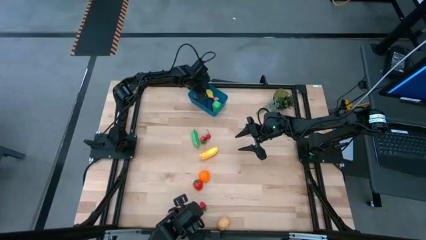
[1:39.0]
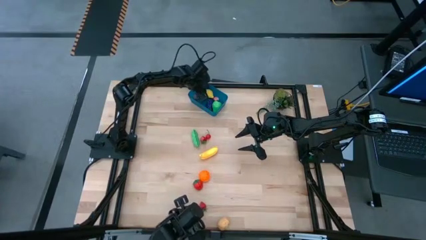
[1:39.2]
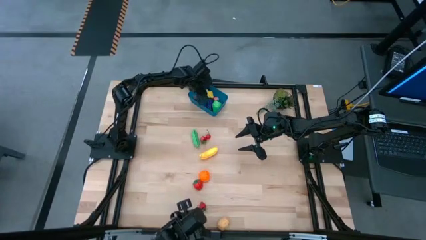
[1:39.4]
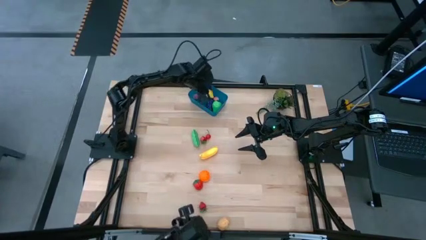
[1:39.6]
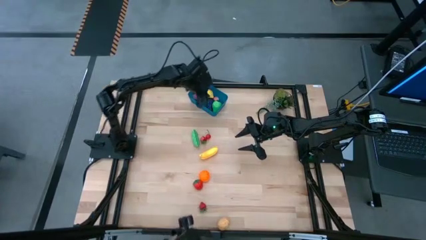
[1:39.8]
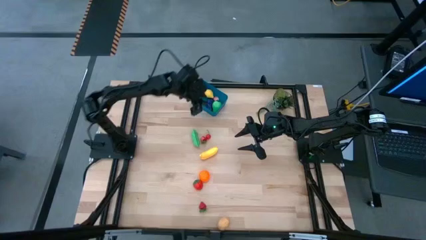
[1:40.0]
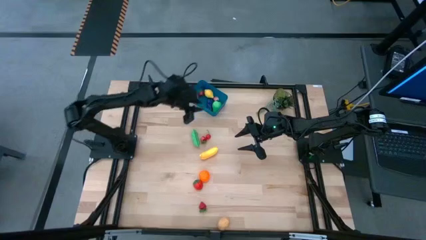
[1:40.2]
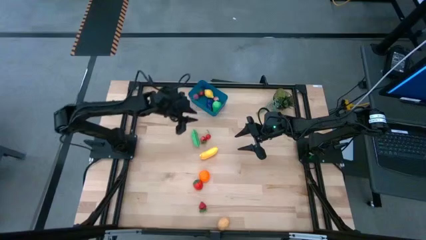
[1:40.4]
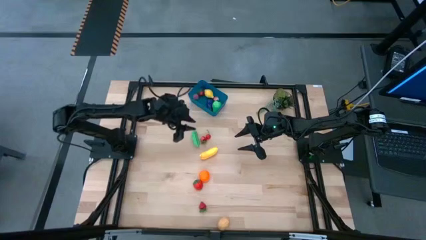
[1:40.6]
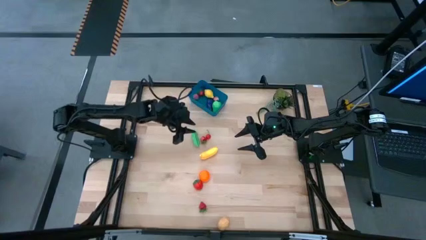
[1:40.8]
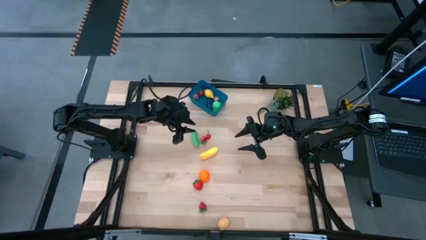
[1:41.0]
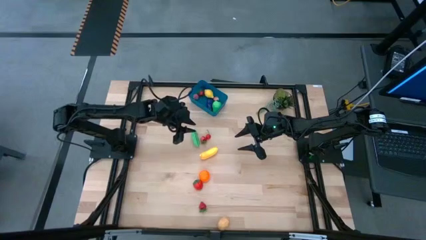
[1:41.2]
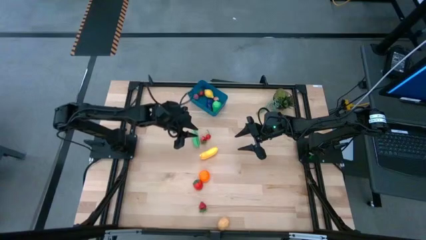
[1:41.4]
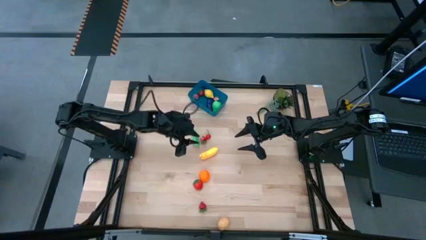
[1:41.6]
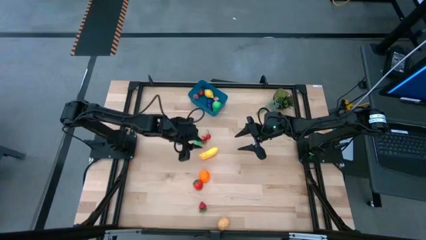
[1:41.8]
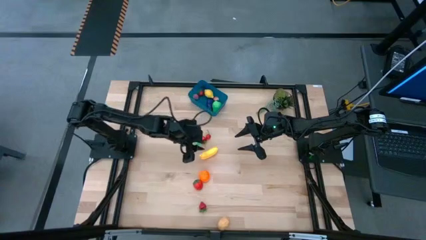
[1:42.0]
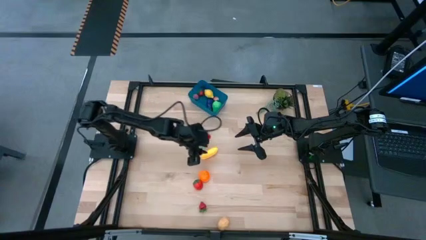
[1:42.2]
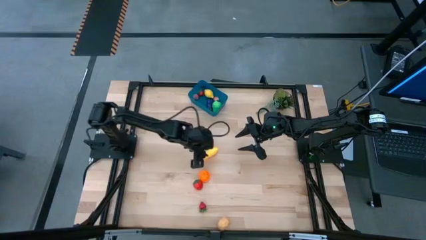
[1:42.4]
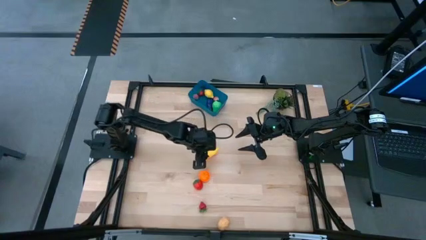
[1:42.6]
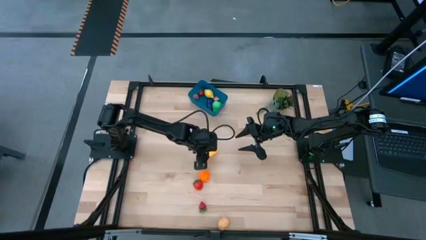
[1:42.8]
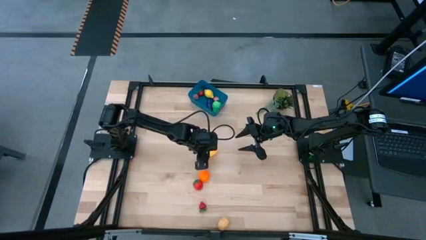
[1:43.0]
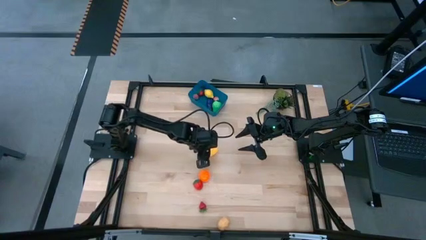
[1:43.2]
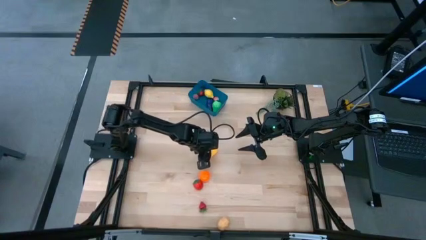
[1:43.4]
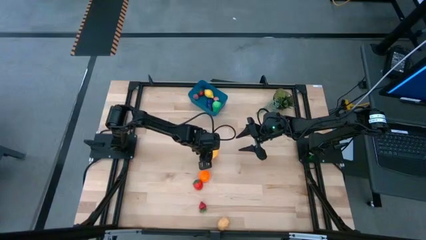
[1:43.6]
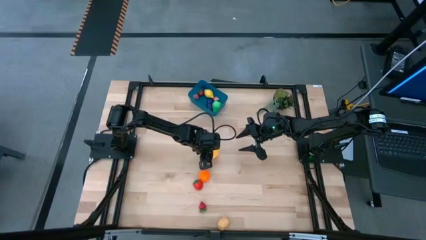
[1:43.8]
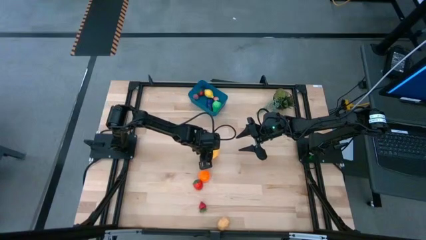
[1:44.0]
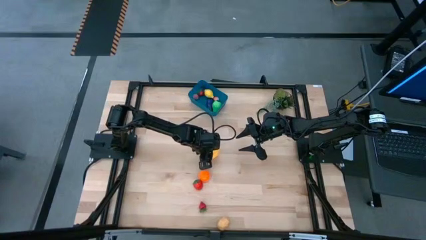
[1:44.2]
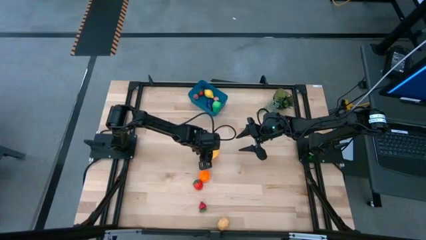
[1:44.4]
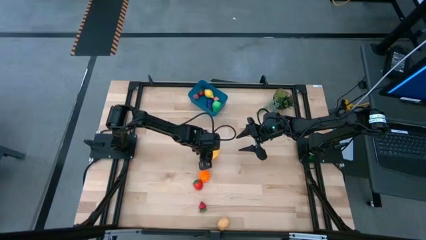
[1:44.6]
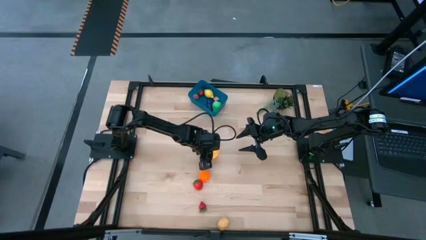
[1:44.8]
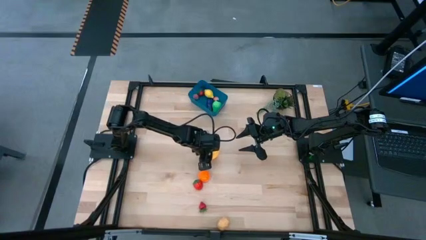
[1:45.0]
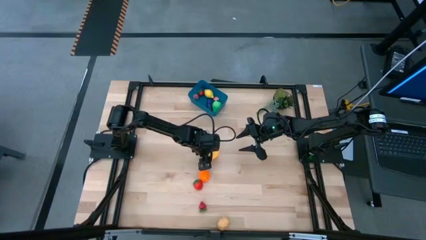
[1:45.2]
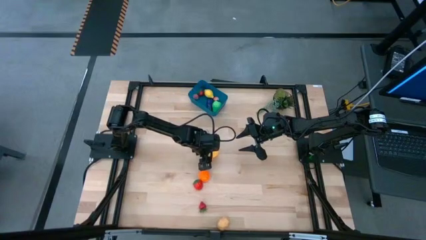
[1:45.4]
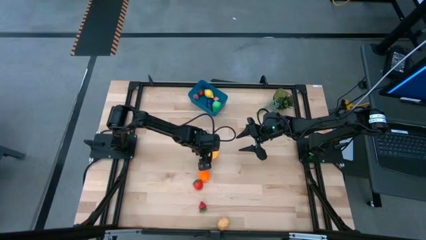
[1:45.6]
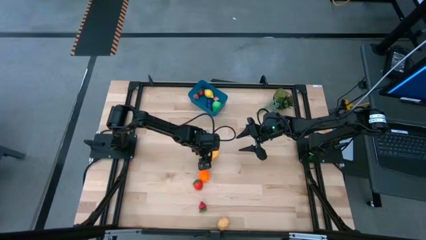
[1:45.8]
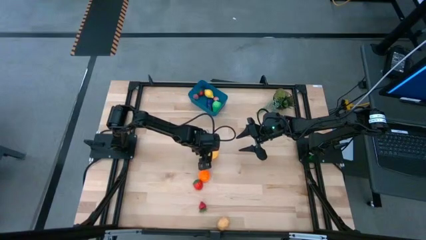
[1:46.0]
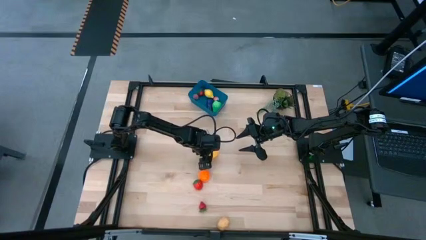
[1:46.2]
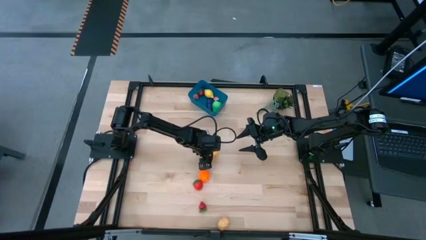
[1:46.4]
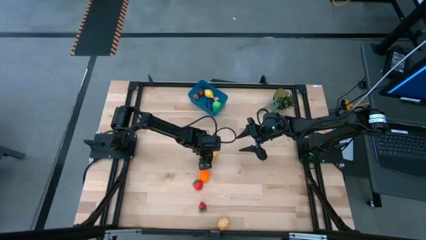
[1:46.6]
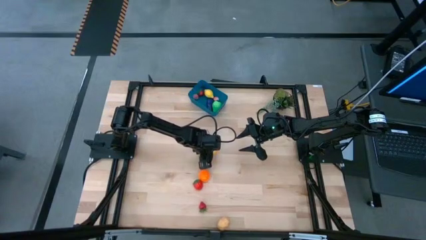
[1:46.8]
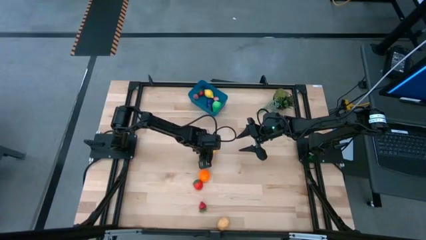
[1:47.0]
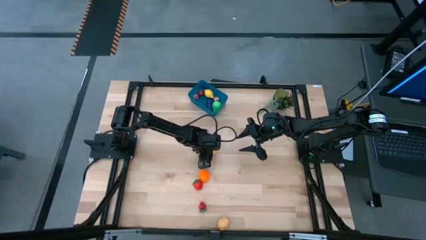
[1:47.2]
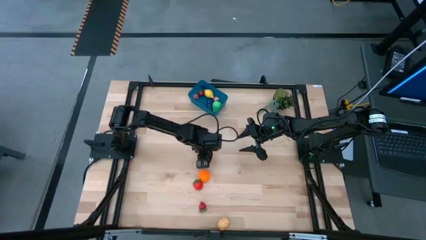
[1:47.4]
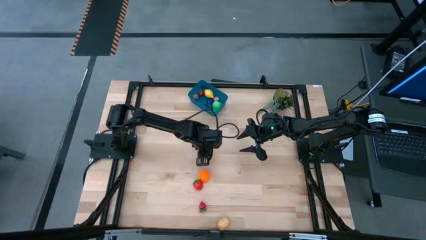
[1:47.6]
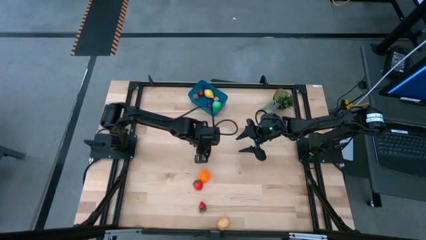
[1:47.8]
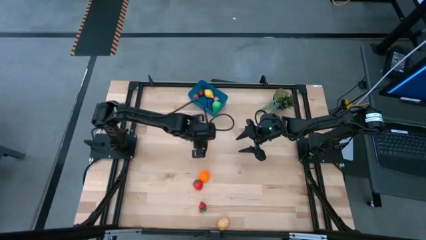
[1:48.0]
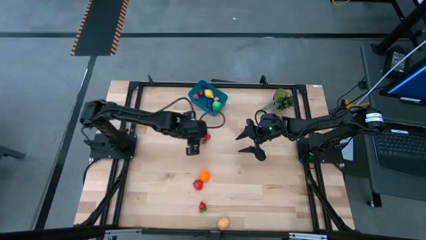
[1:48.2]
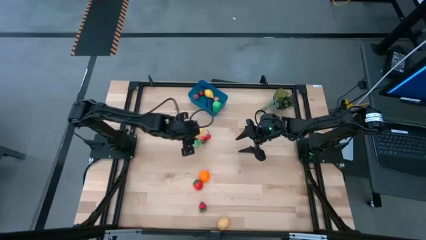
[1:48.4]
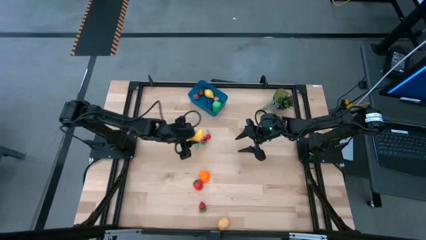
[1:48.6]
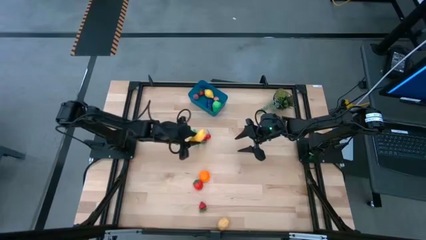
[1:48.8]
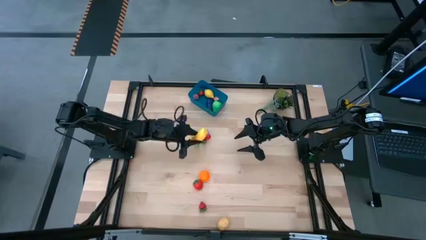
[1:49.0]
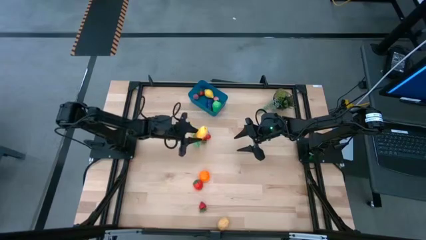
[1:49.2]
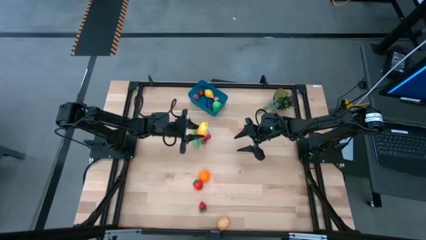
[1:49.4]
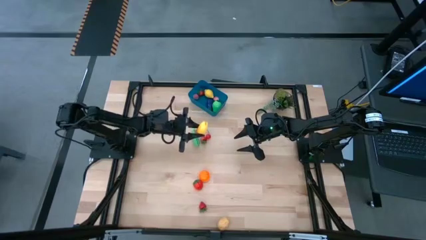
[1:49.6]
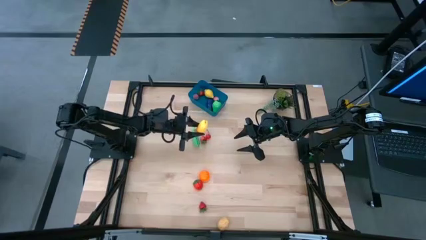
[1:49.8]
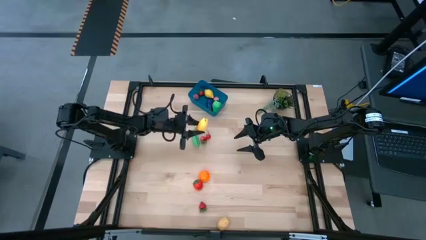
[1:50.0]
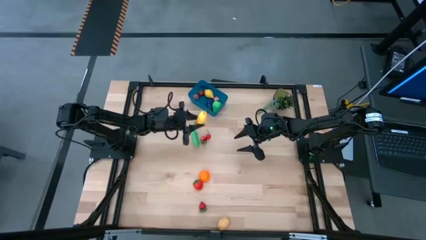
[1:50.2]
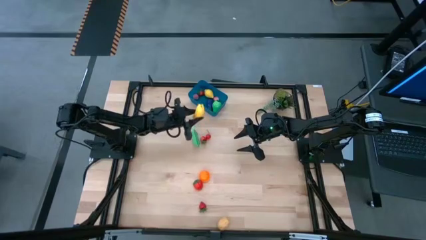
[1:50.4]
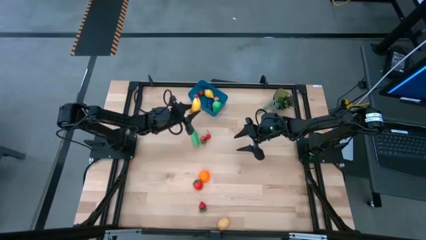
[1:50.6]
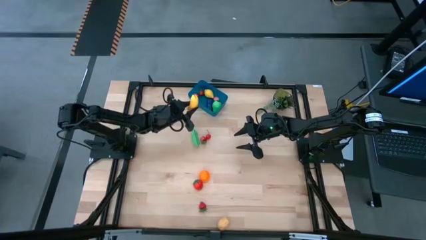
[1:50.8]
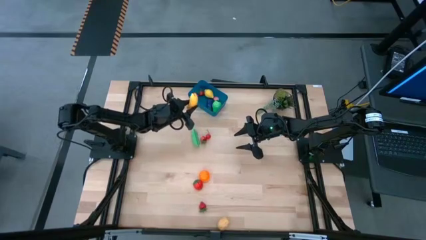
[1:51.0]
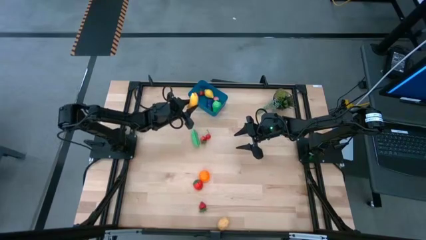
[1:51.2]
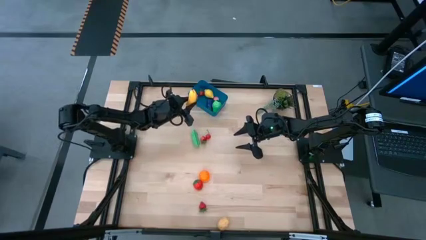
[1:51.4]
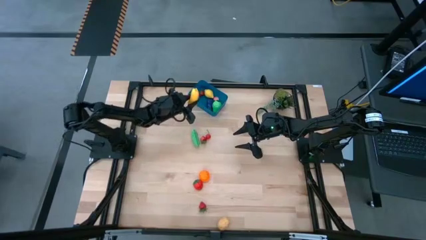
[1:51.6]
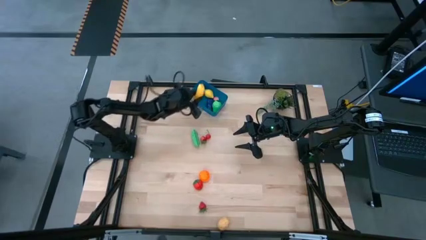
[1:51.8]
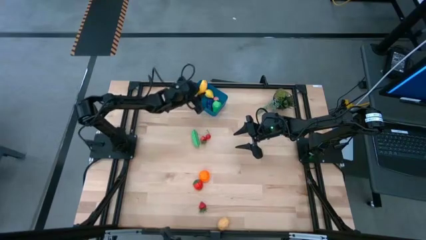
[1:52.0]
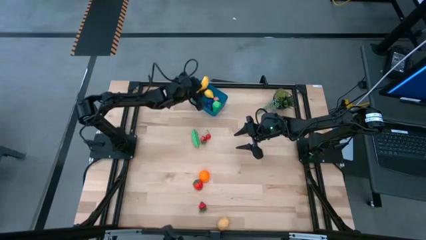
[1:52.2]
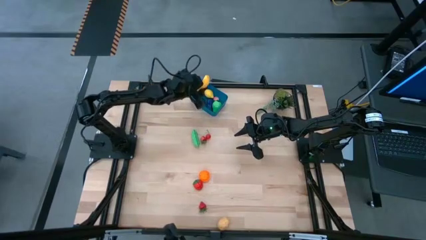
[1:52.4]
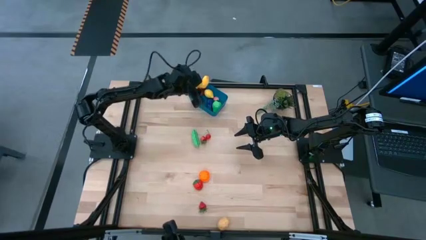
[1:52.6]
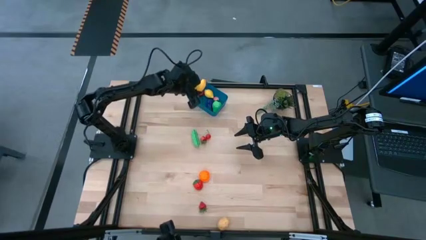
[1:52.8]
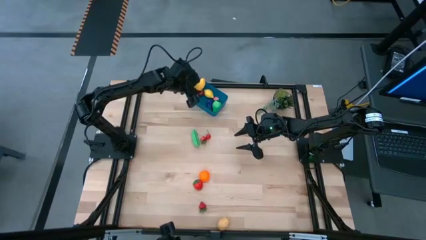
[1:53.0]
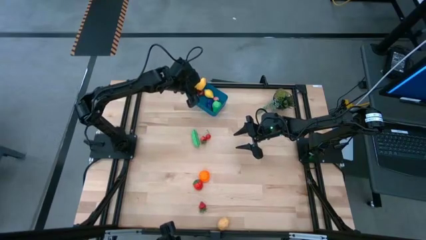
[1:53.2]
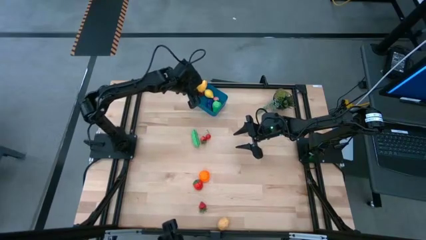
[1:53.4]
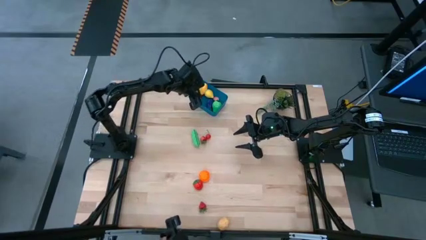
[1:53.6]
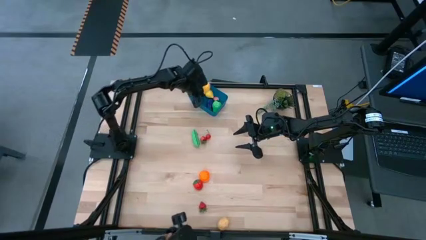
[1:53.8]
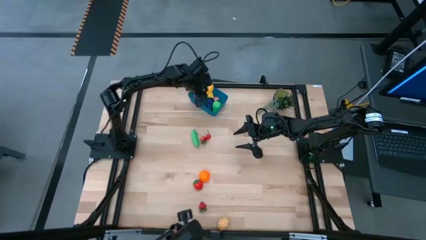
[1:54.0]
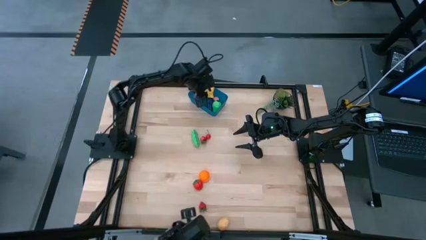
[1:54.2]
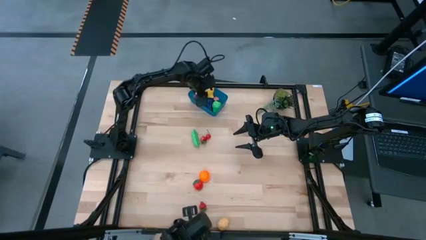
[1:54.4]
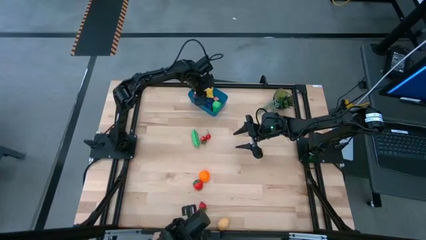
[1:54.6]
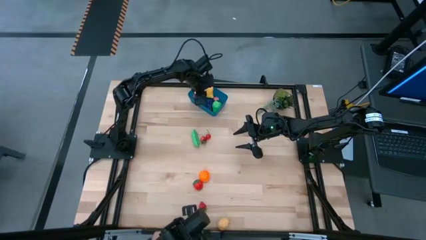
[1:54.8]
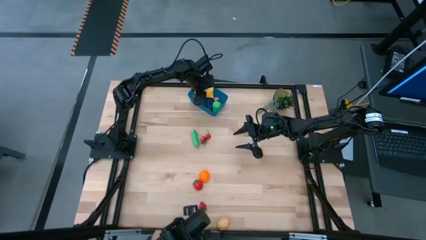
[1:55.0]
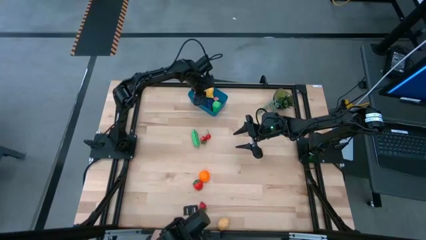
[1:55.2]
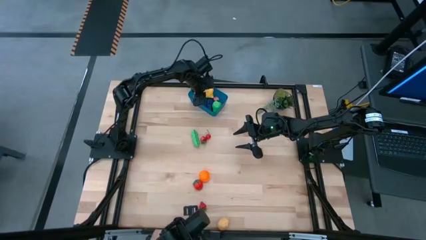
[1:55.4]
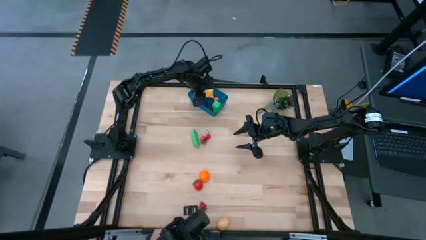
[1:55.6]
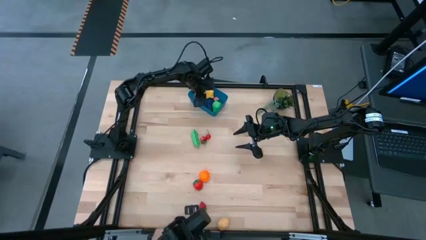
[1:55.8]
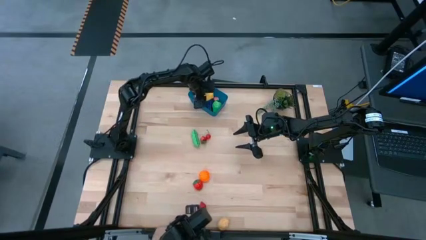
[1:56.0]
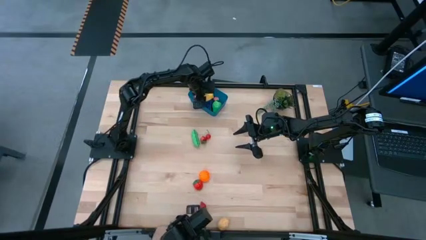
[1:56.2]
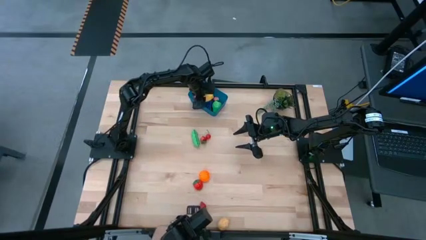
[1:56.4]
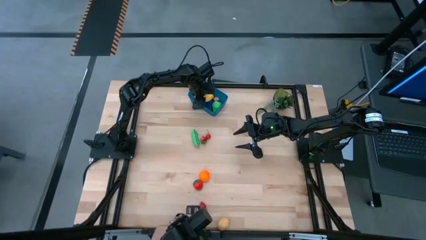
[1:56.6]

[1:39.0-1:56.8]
Task: Pick and placing Produce into tupperware
Put the yellow banana into the blue bin
